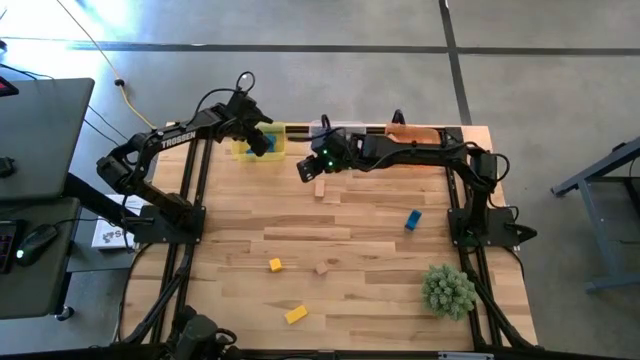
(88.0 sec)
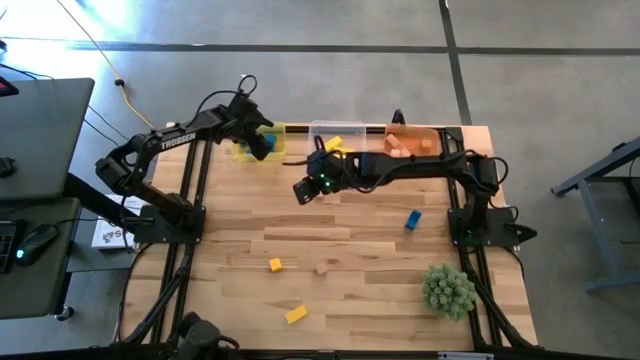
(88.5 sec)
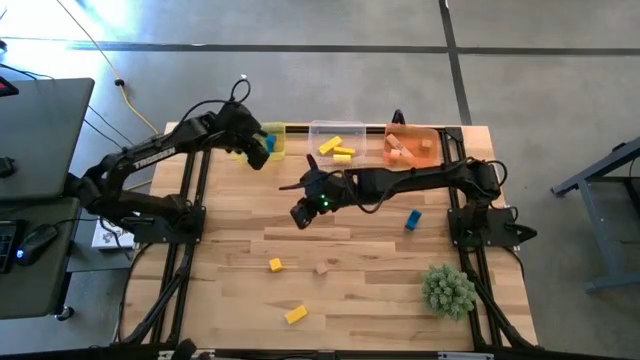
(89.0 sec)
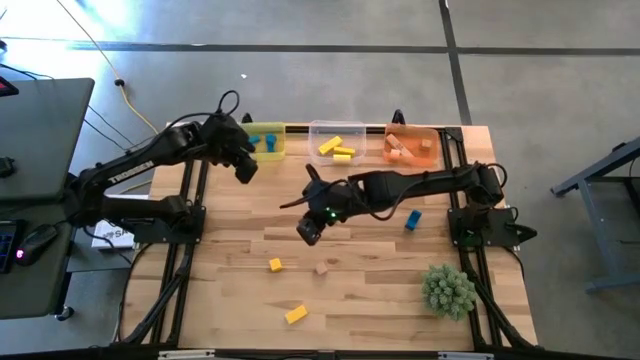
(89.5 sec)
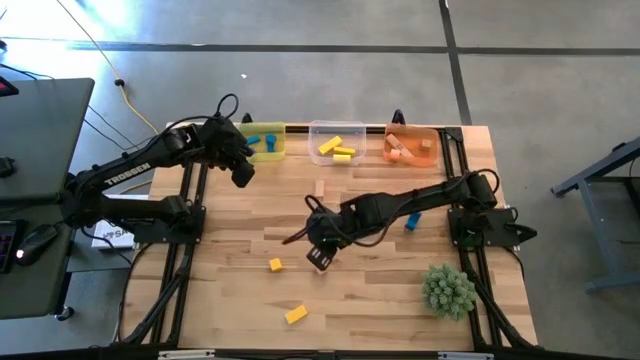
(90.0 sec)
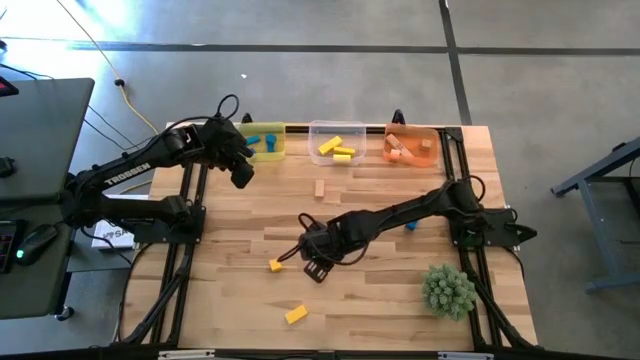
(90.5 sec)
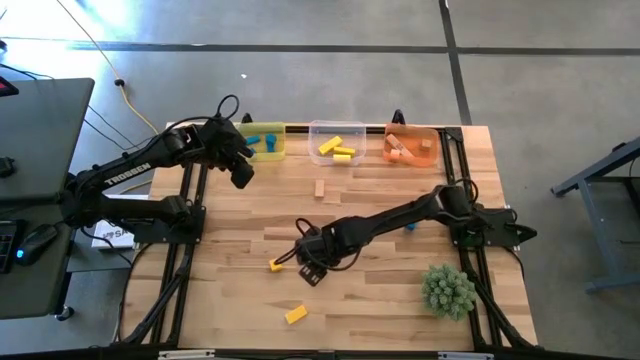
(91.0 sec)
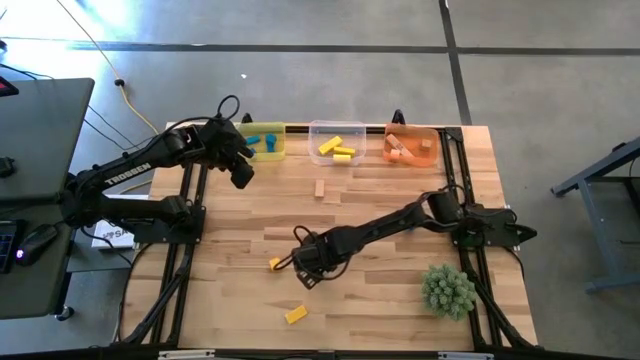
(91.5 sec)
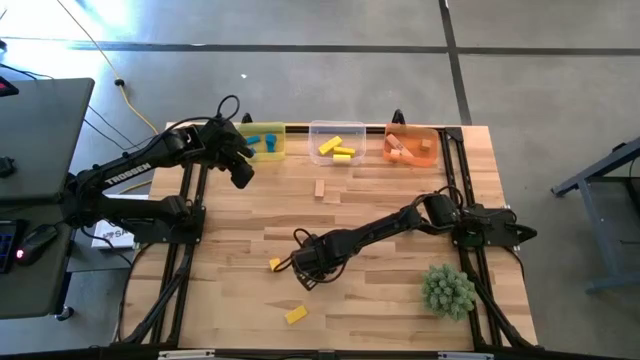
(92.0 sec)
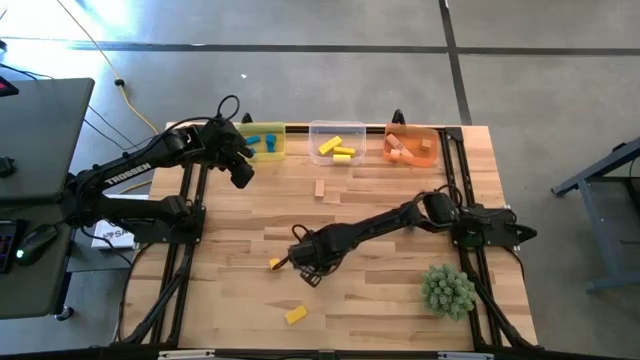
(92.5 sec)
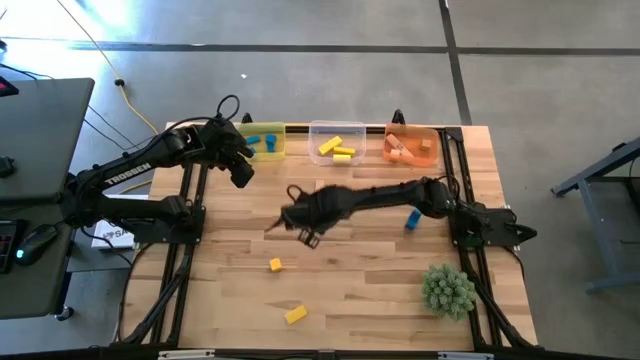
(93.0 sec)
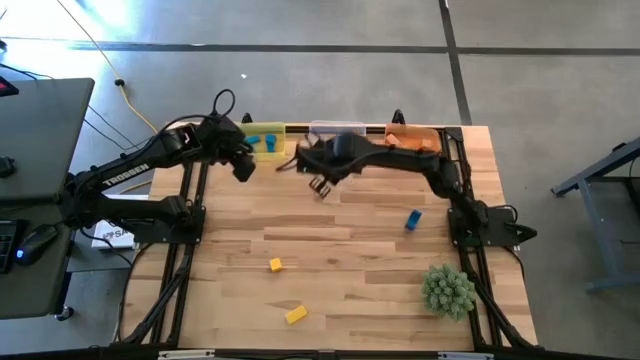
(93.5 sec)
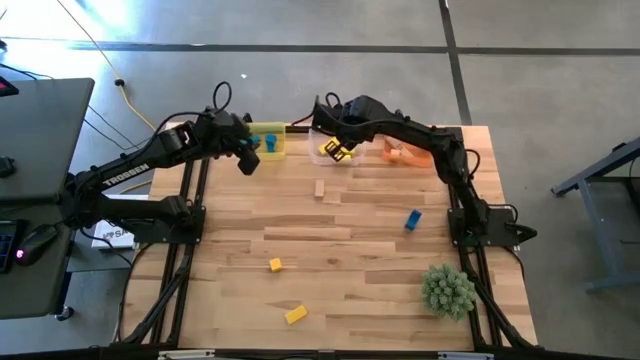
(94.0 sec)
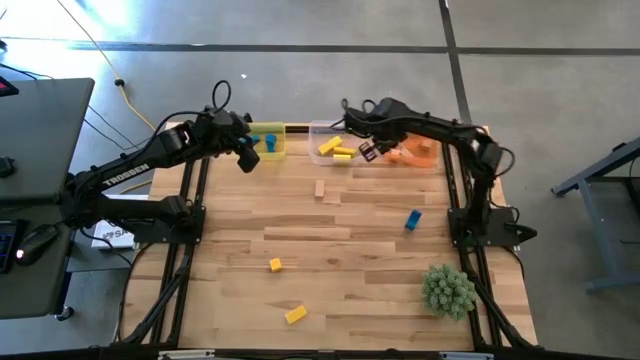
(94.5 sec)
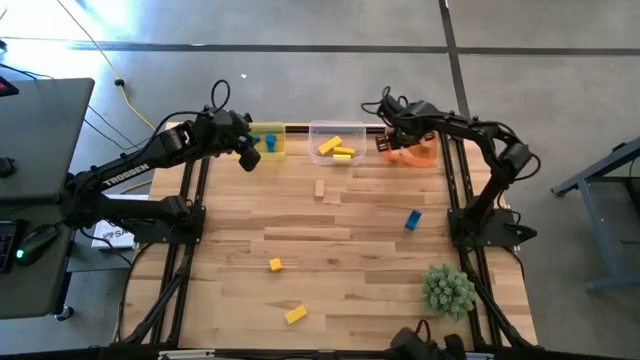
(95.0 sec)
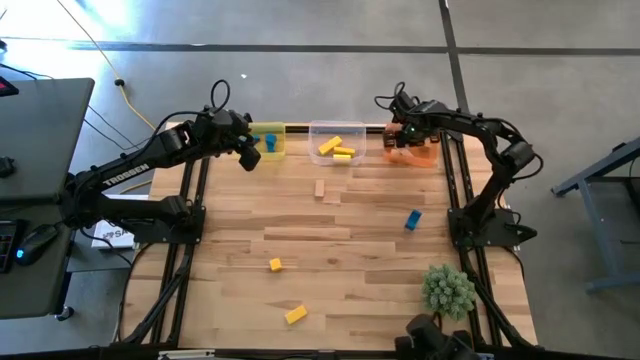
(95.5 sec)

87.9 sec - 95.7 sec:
Task: Sort & place blocks by color
Put the brown block into the orange bin

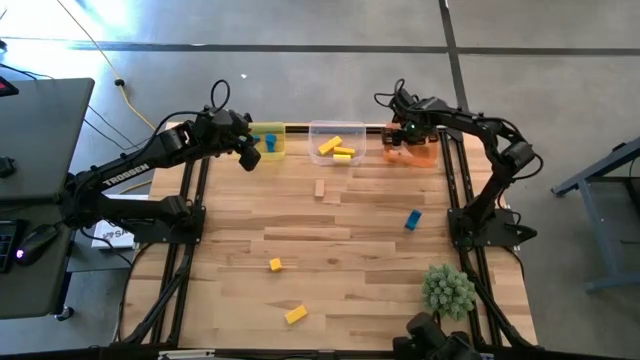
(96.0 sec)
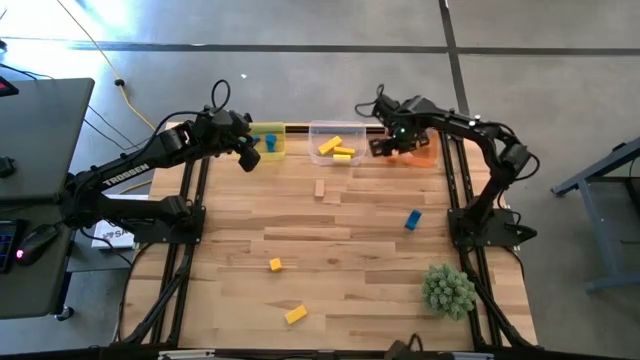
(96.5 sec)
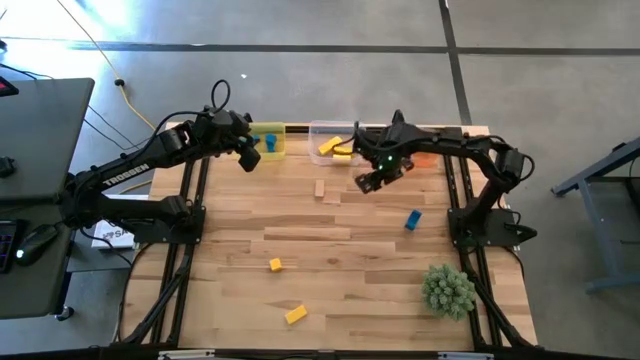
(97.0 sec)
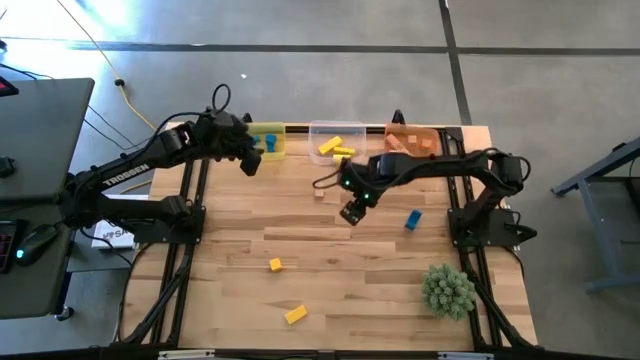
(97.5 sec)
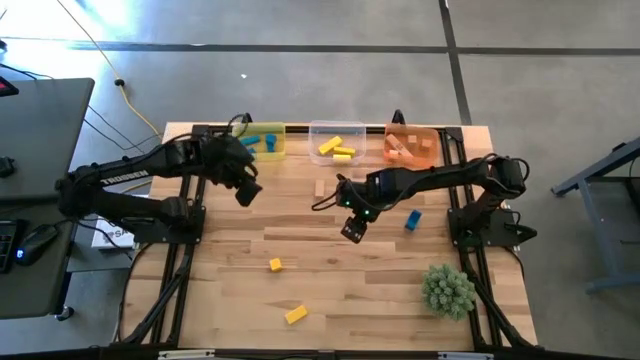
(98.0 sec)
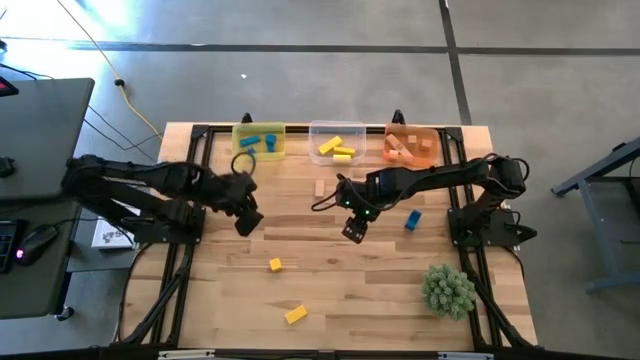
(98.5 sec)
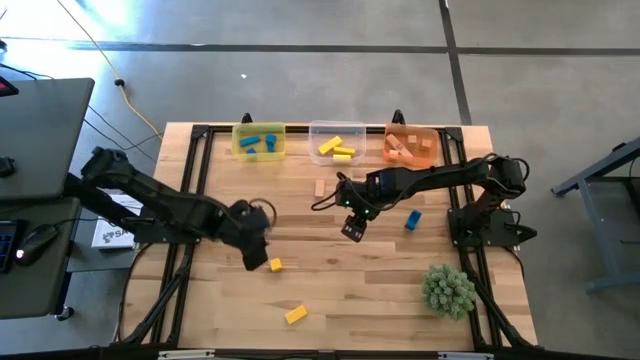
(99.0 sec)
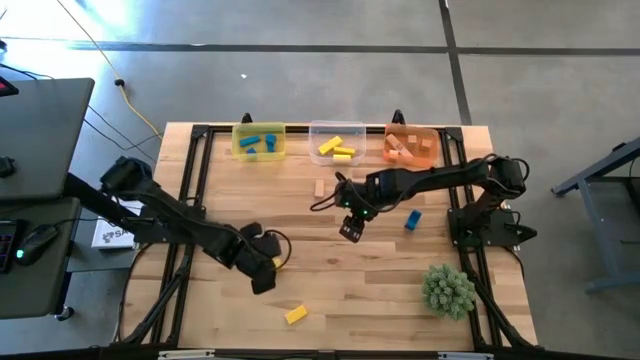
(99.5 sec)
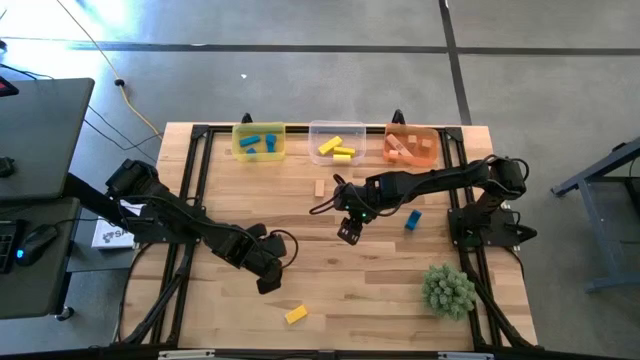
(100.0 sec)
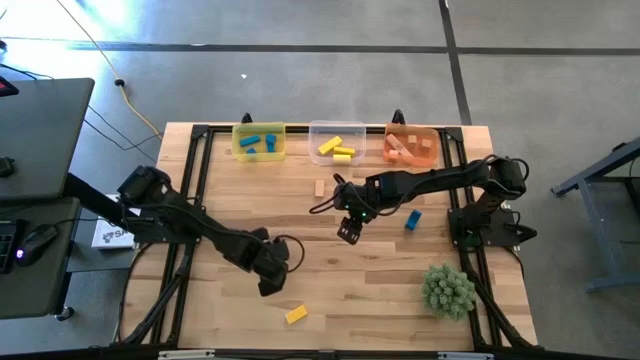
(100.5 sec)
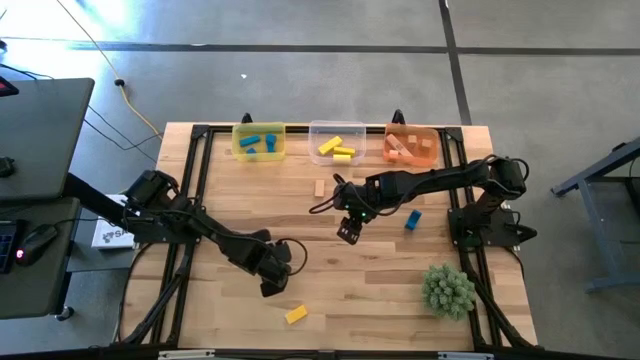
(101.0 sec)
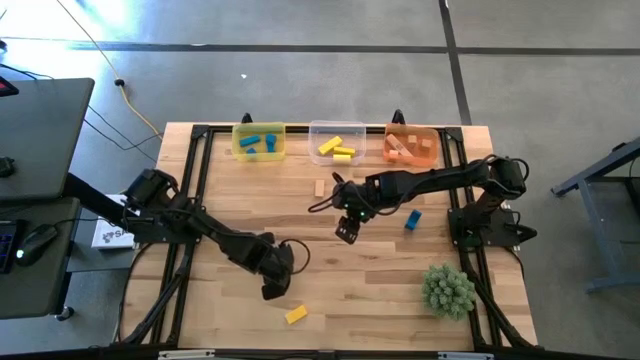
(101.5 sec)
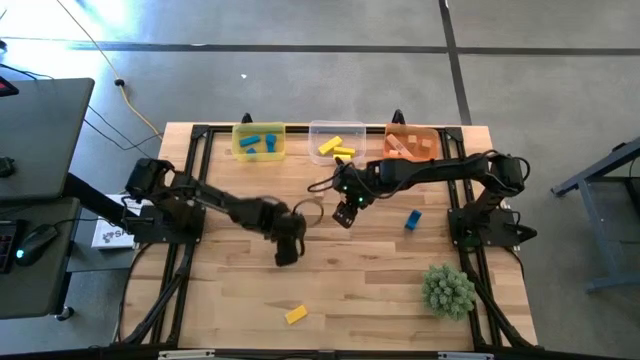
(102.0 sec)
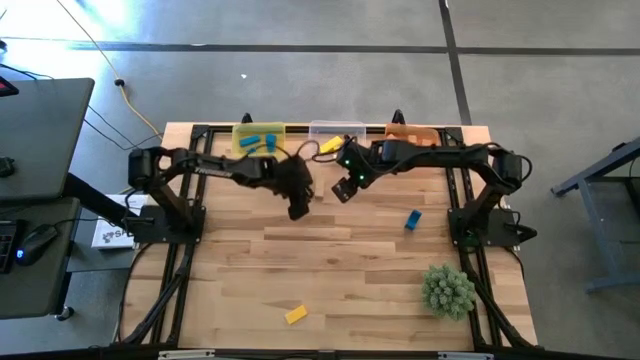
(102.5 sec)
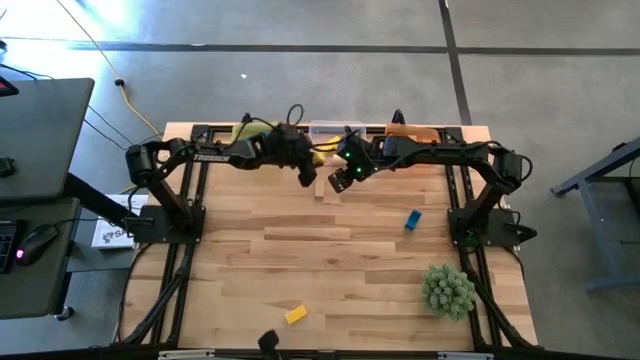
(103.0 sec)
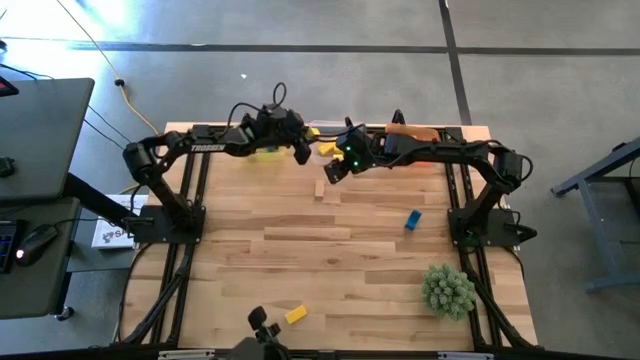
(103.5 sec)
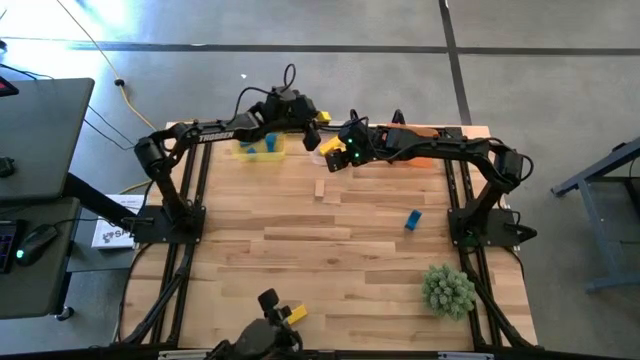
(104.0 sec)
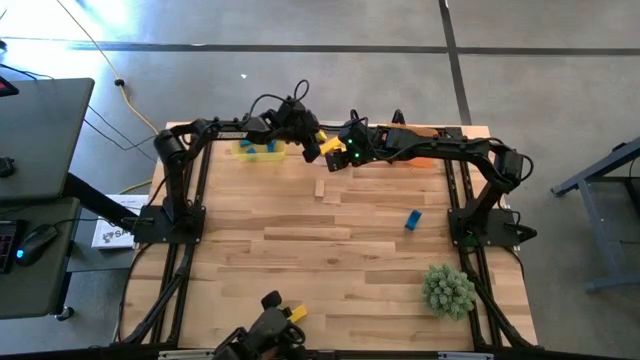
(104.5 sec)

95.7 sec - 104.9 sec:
Put the yellow block into the transparent bin

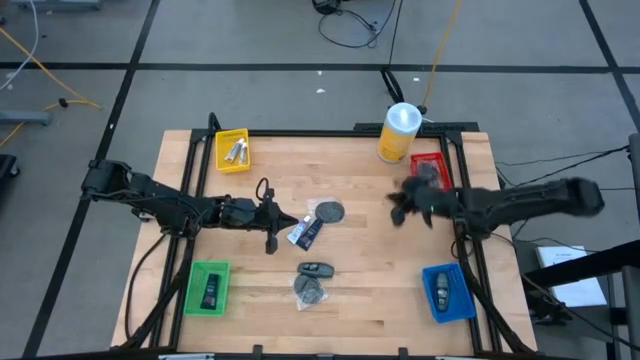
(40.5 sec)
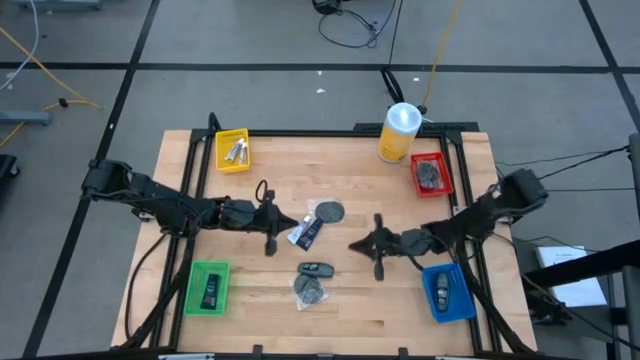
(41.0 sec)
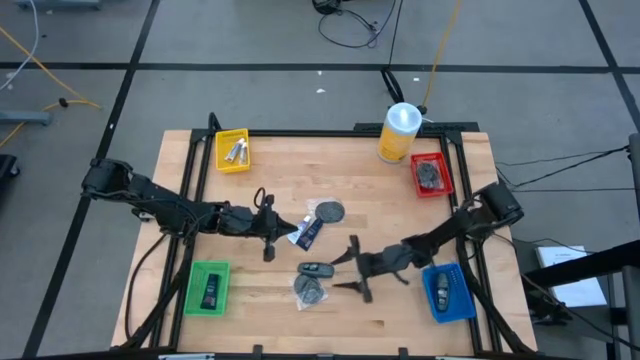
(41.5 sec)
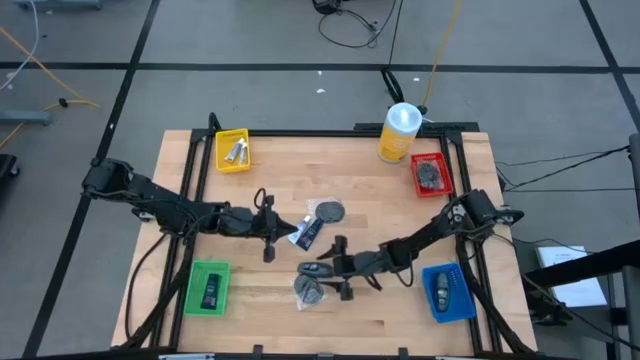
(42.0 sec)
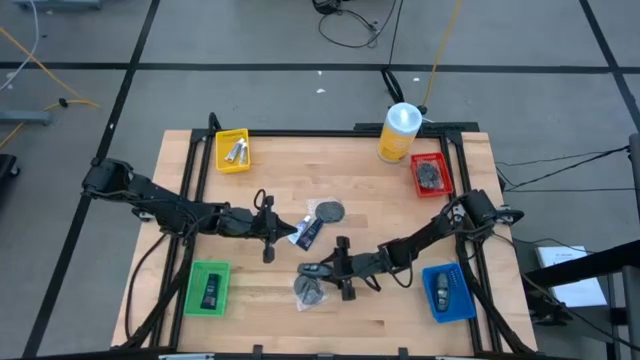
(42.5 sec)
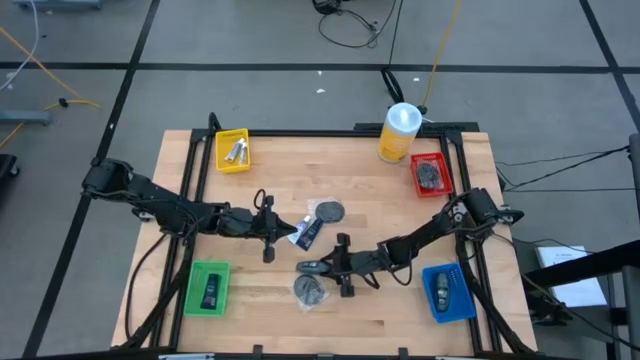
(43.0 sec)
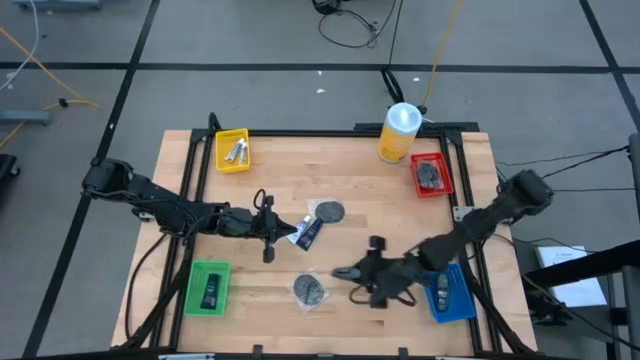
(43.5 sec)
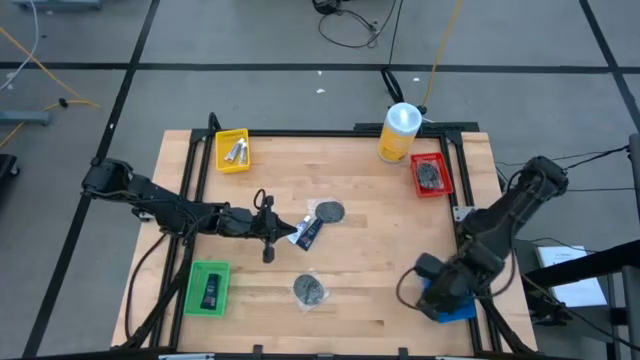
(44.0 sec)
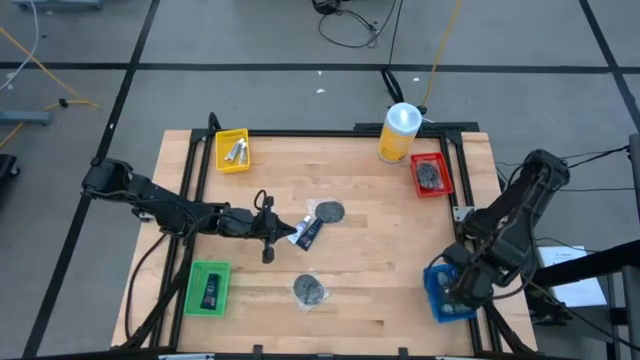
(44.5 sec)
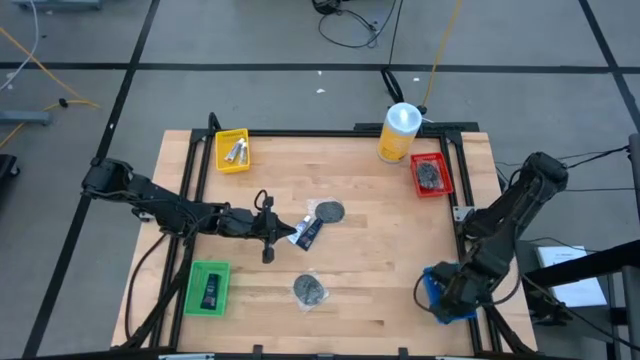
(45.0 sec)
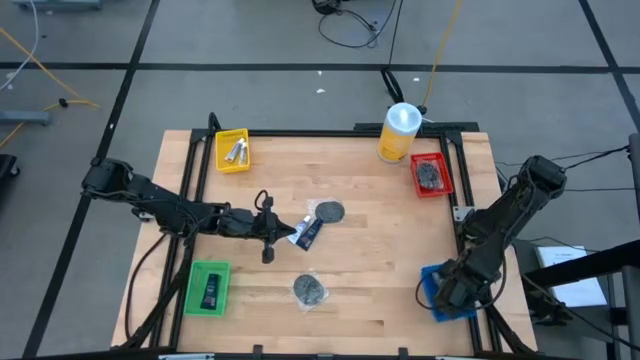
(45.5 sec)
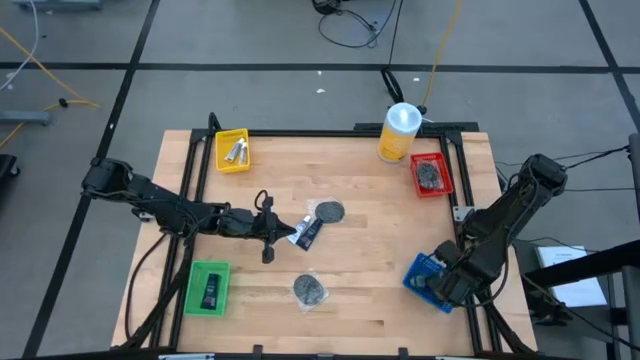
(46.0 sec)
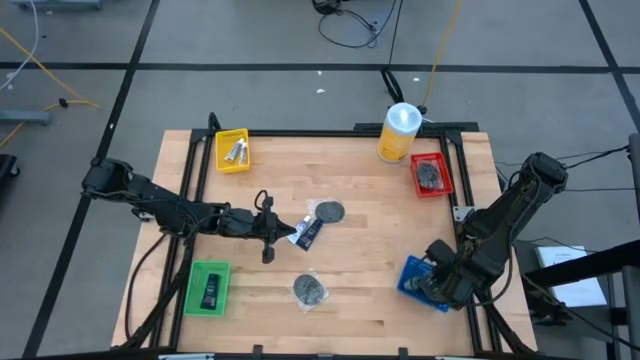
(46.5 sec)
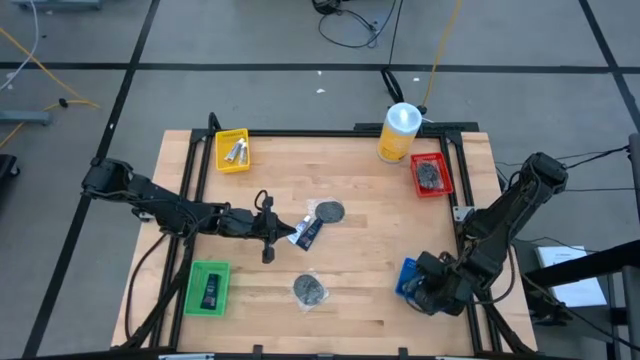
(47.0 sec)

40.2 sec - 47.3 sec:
Task: Pick & Place Travel size toiletries
Put the black deodorant into the blue bin
